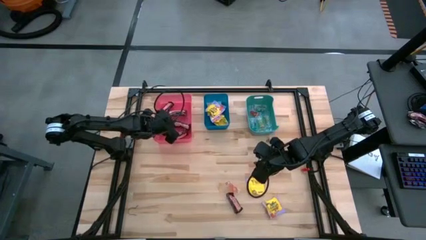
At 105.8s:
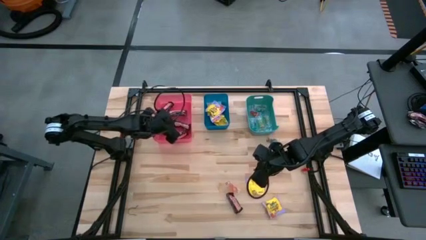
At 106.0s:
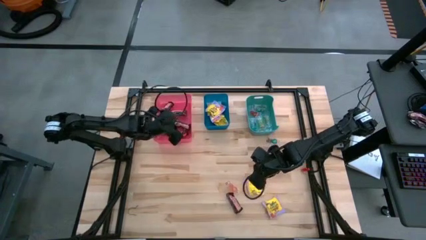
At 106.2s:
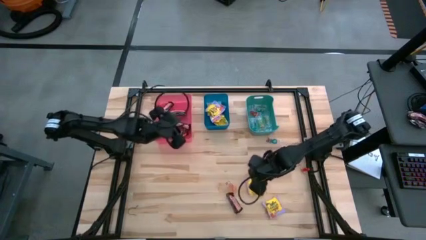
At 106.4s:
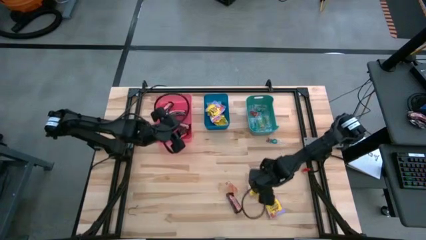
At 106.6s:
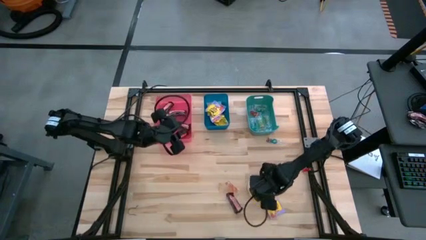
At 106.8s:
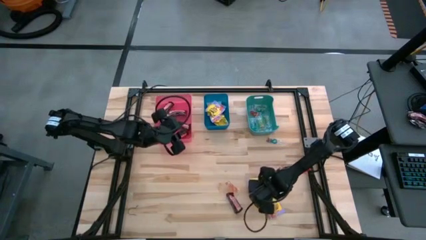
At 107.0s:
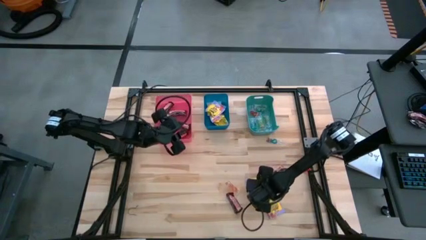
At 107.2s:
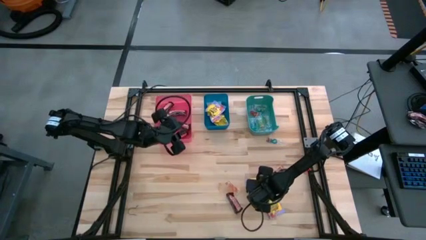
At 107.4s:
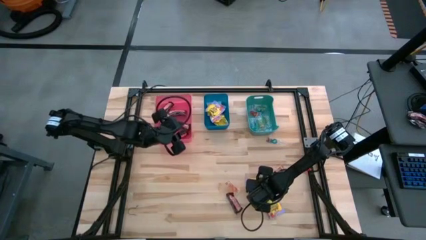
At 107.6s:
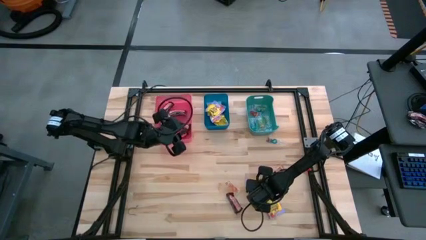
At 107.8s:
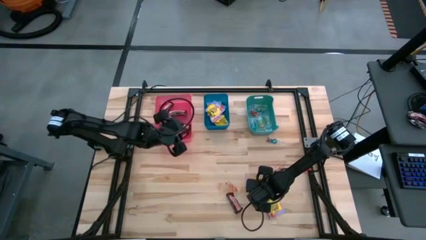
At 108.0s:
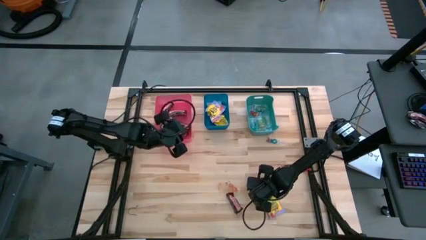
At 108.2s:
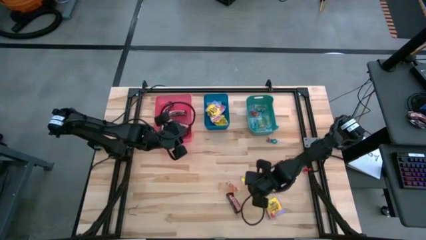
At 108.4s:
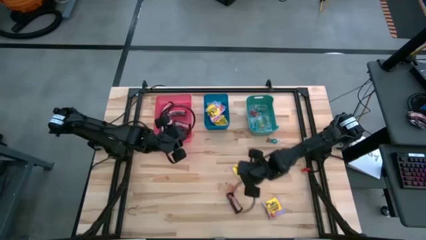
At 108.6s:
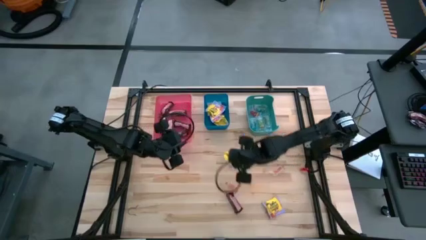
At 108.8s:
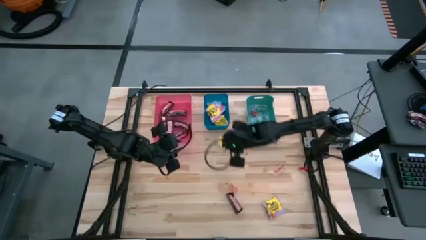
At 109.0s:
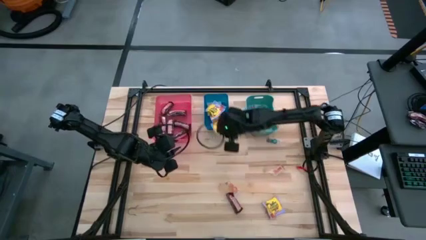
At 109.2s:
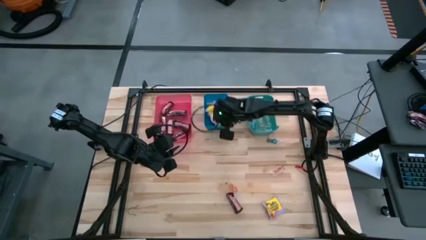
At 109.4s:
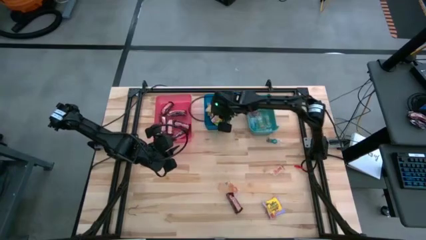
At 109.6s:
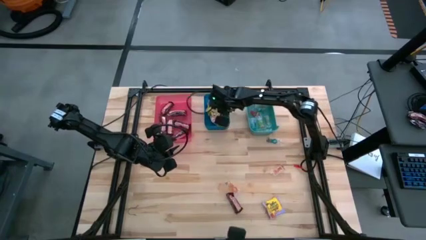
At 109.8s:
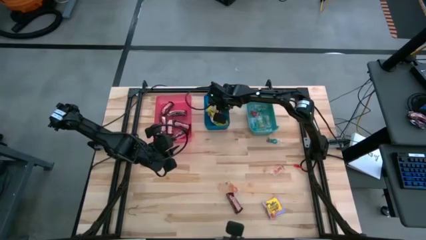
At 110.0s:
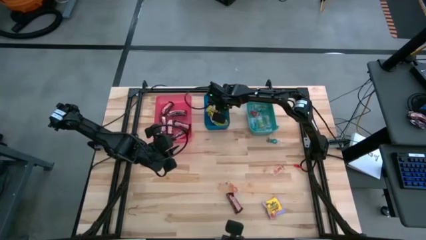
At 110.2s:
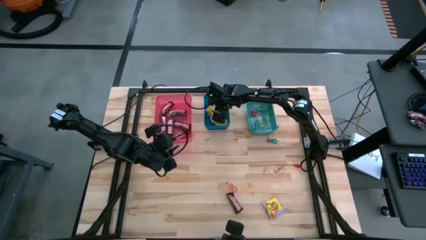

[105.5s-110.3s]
Task: Sort candy
Put the yellow candy into the blue bin

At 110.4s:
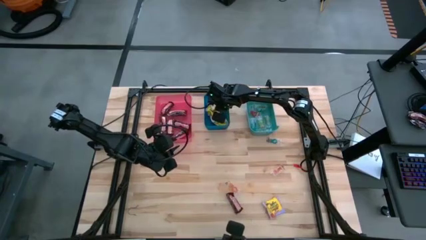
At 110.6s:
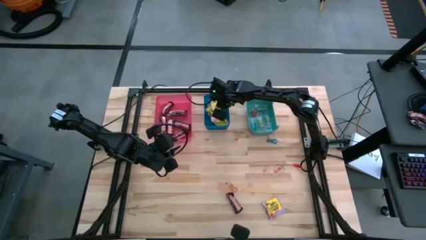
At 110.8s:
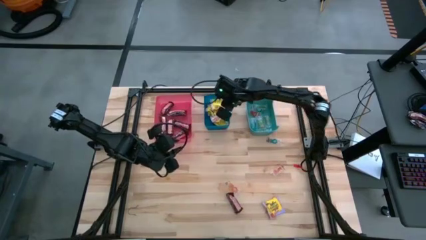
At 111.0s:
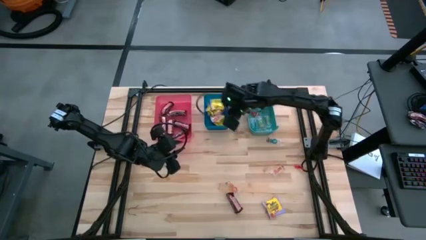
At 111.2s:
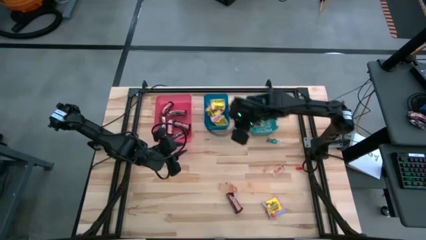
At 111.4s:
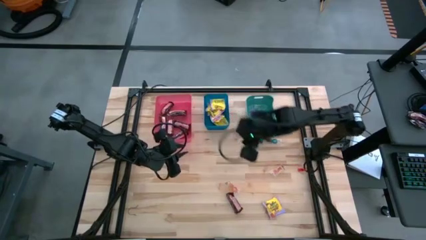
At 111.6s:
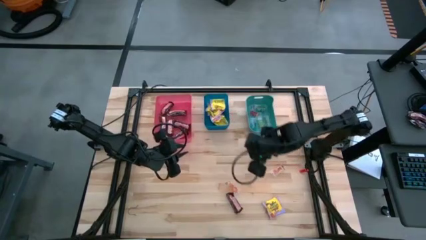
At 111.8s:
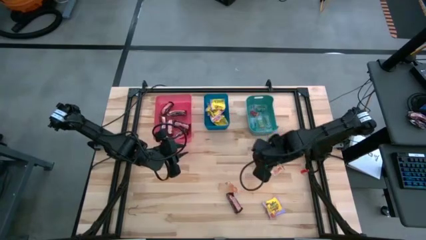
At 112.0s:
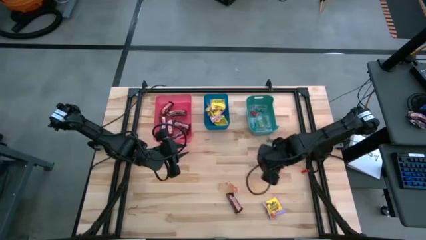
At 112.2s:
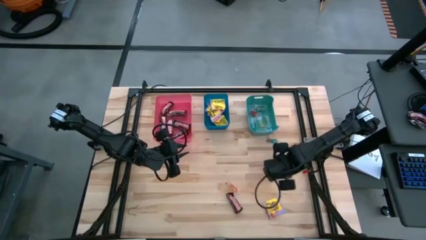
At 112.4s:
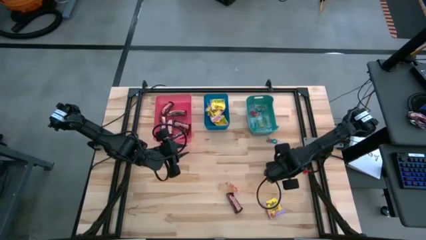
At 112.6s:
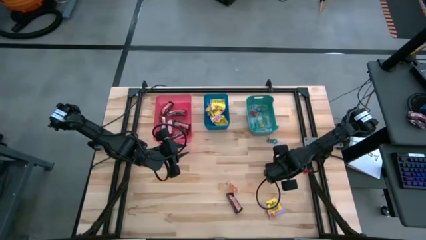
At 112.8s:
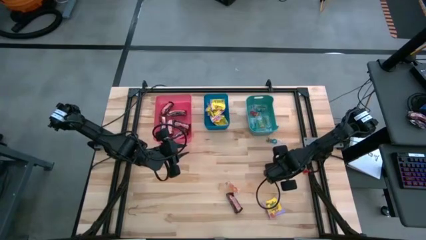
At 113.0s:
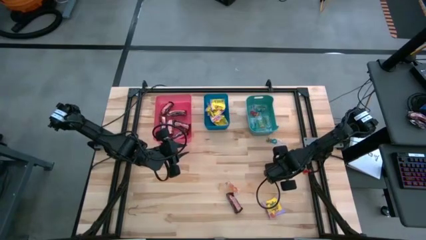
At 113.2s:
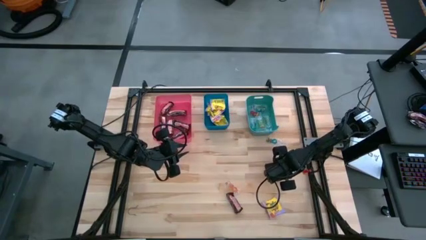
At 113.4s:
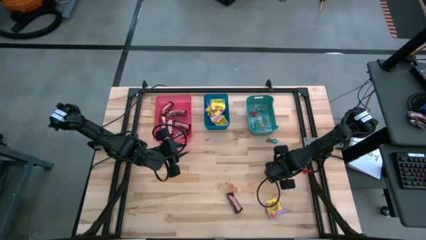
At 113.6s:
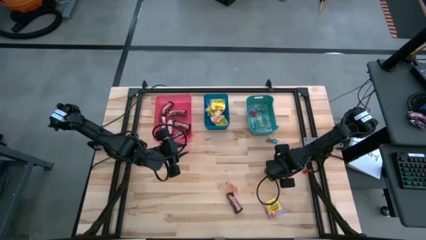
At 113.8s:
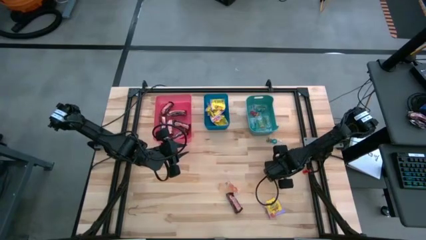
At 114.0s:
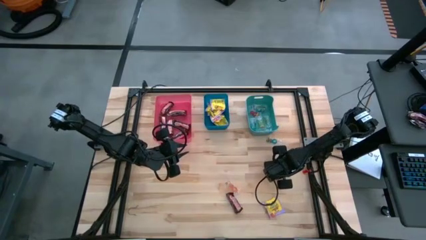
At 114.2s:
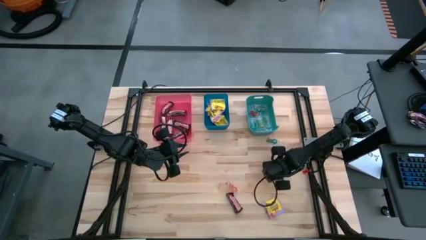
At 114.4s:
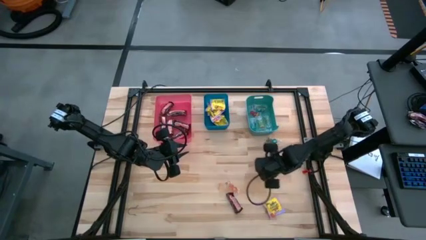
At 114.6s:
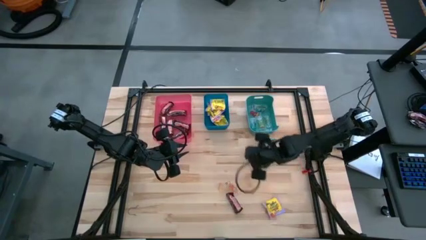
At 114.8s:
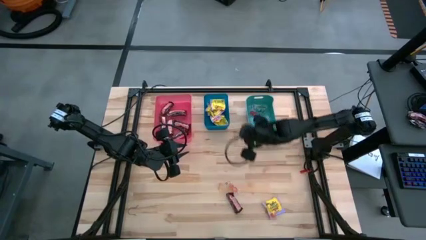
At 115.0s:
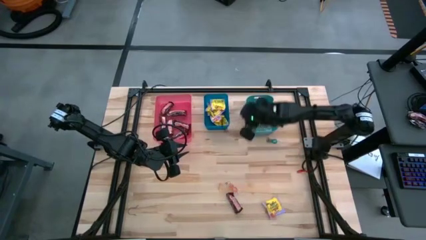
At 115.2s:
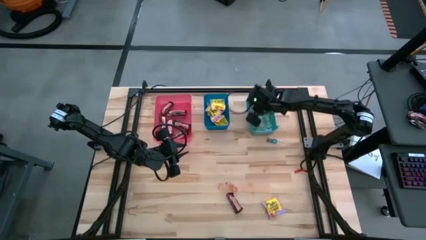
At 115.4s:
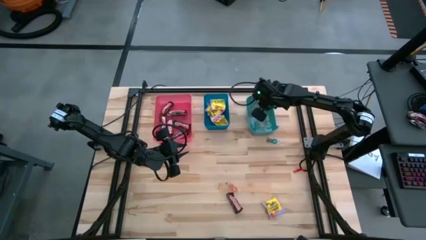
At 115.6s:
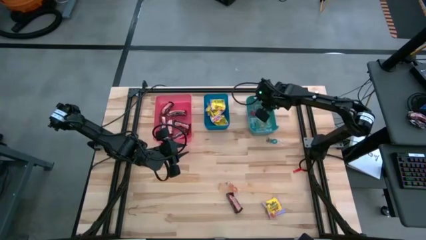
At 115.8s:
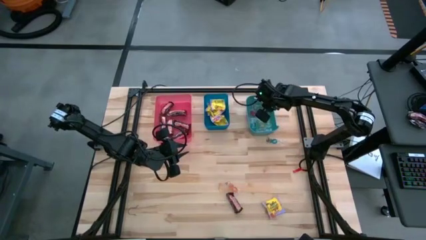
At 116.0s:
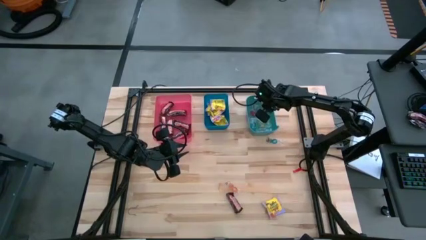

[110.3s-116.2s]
Put the orange gummy candy into the green bin

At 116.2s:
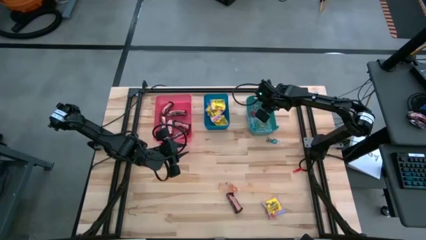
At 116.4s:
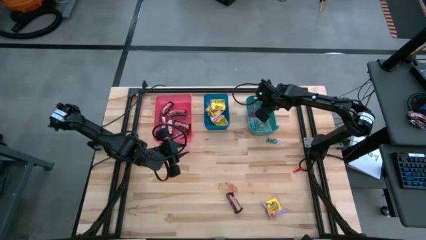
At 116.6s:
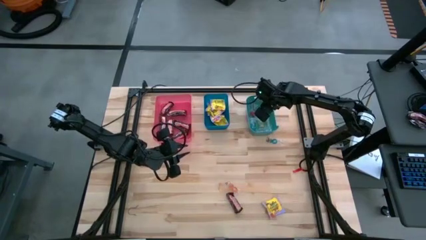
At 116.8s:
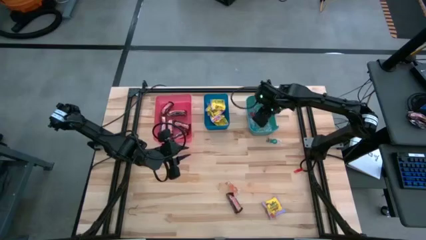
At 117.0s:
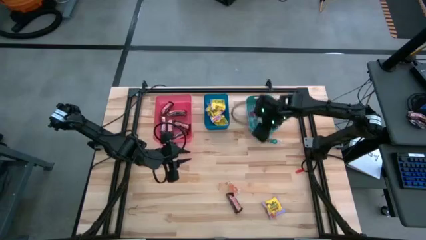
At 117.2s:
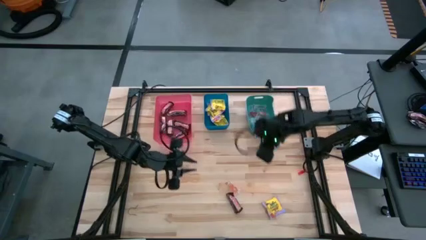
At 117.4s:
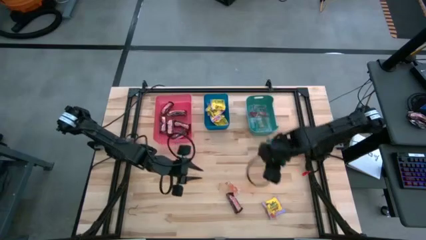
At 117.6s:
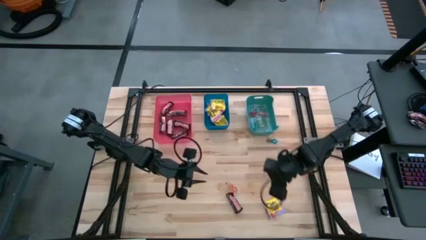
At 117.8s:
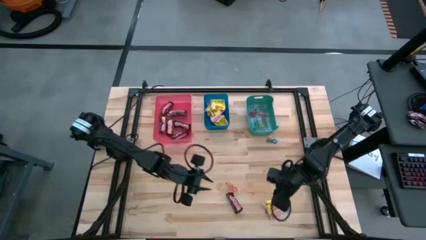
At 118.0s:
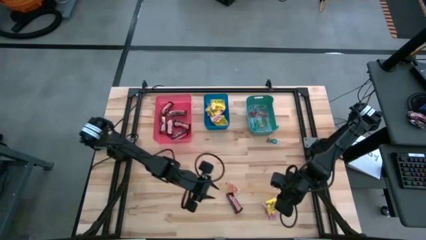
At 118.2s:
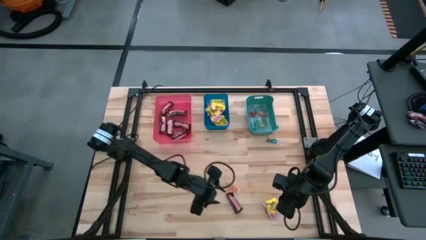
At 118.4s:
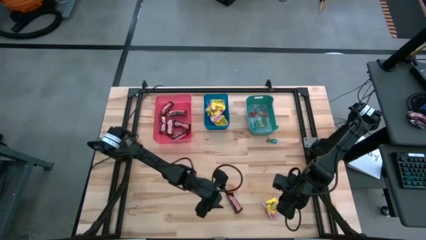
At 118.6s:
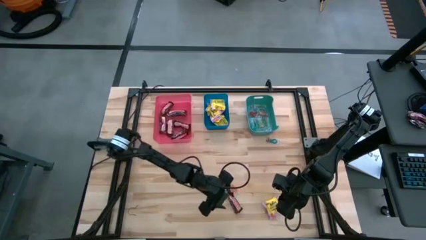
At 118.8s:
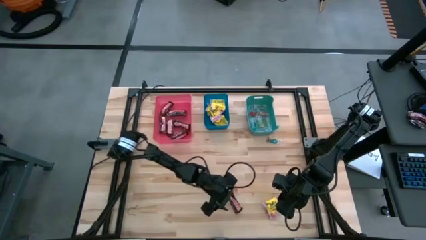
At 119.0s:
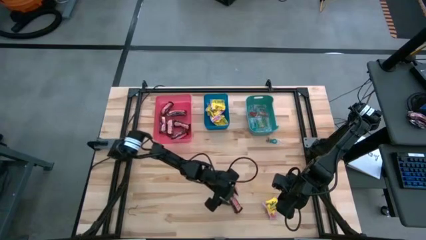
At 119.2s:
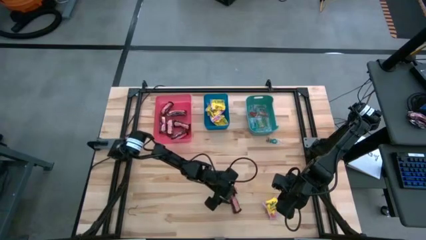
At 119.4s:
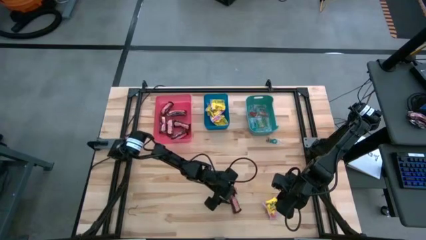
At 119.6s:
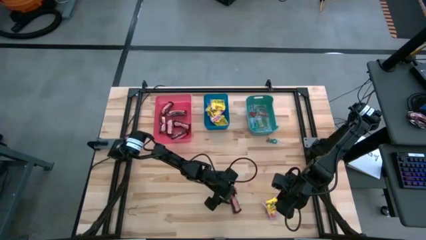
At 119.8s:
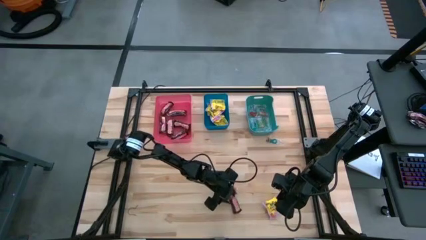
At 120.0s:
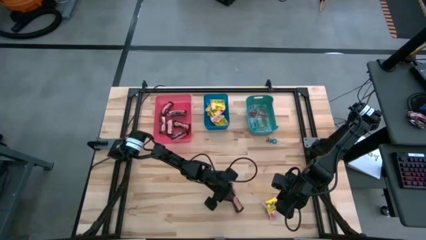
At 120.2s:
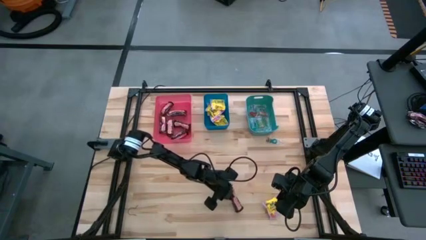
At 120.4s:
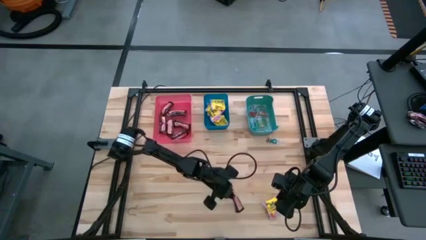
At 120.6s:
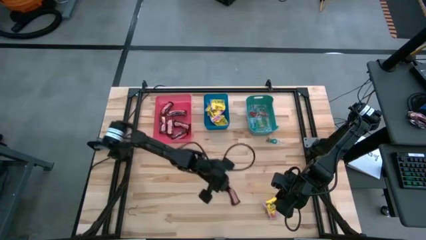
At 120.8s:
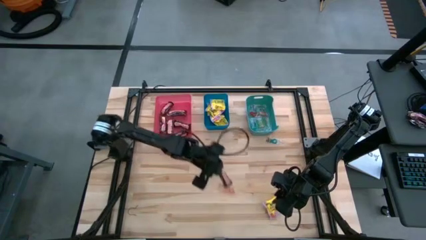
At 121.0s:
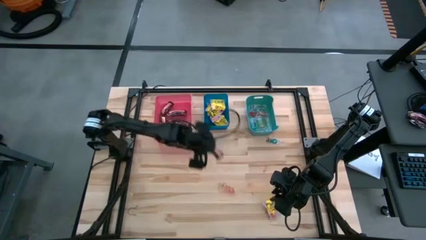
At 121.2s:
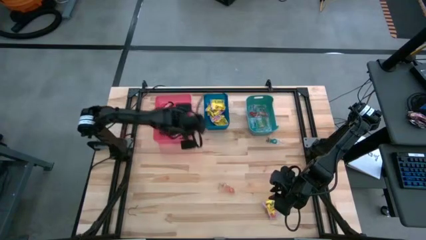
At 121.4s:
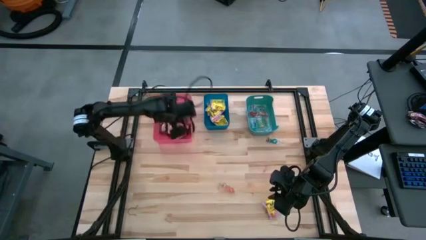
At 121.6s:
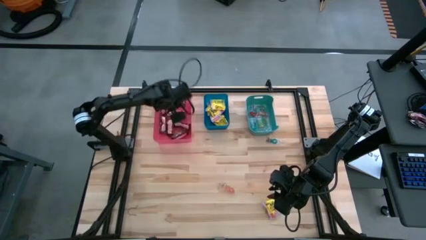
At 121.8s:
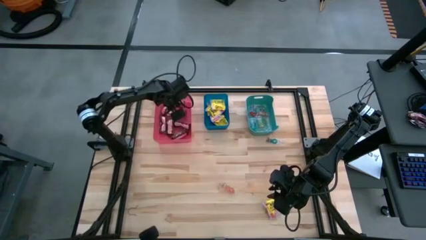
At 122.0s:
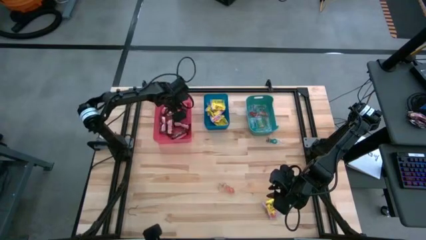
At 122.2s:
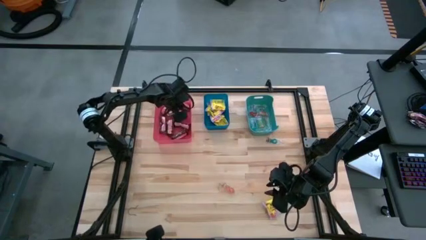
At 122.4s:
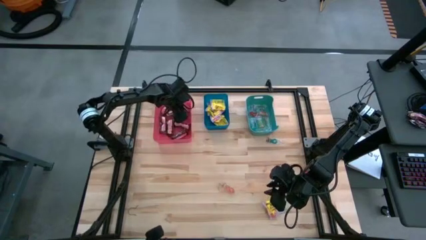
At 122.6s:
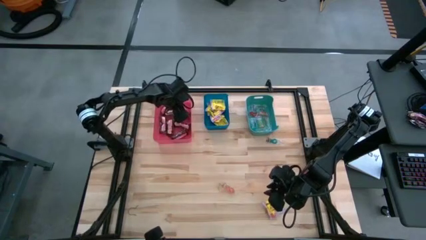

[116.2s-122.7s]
Put the chocolate bar into the red bin
